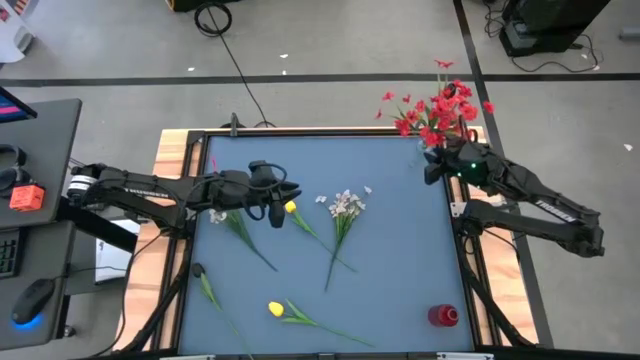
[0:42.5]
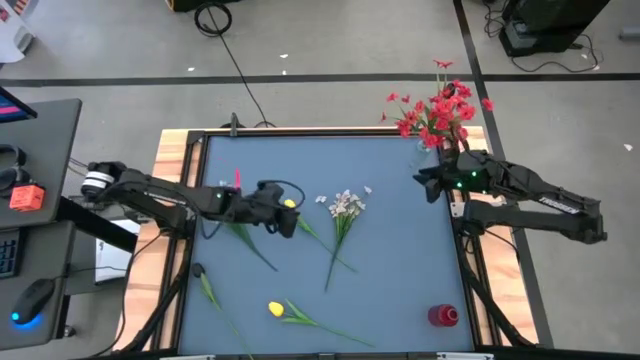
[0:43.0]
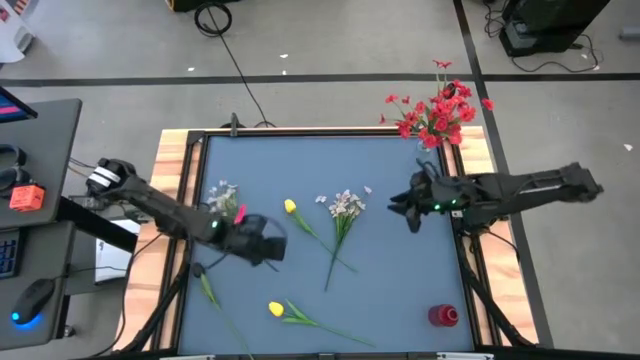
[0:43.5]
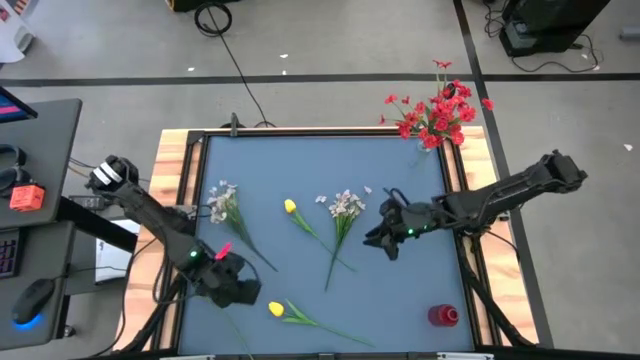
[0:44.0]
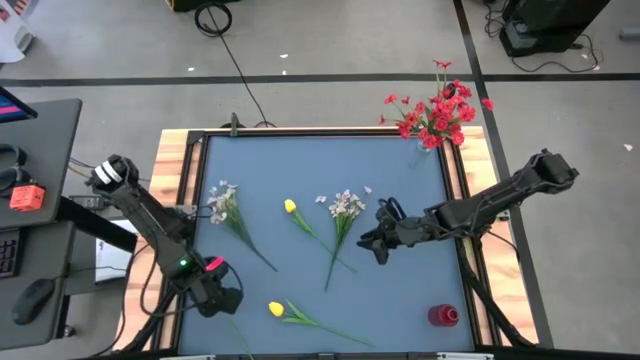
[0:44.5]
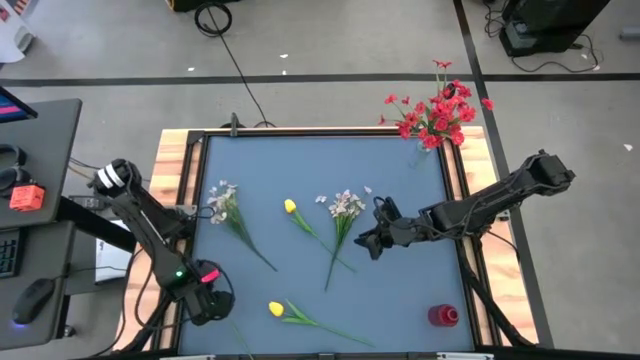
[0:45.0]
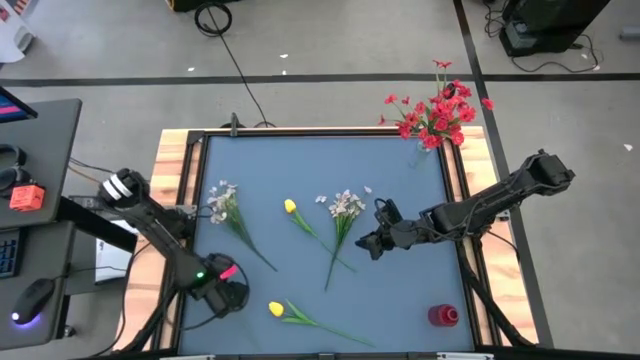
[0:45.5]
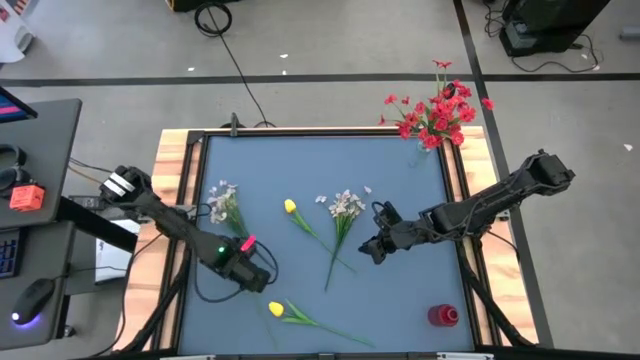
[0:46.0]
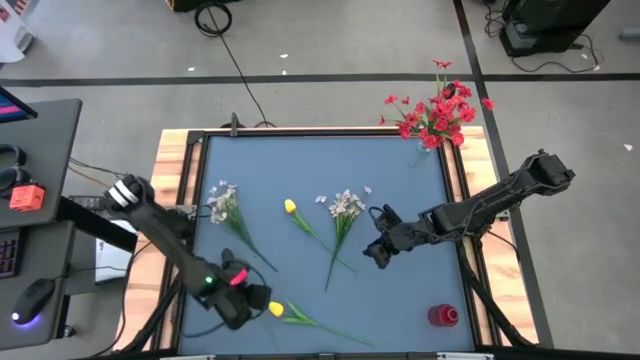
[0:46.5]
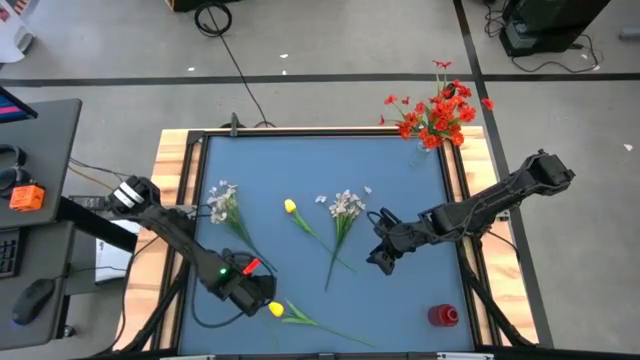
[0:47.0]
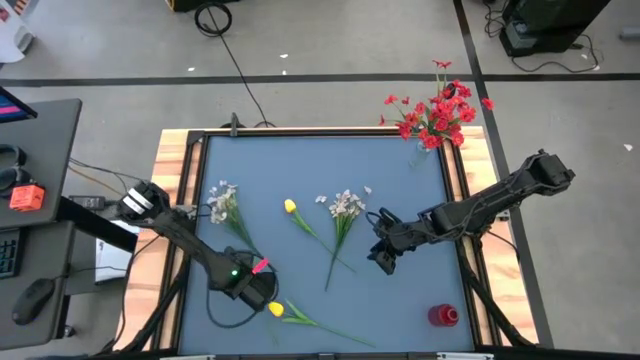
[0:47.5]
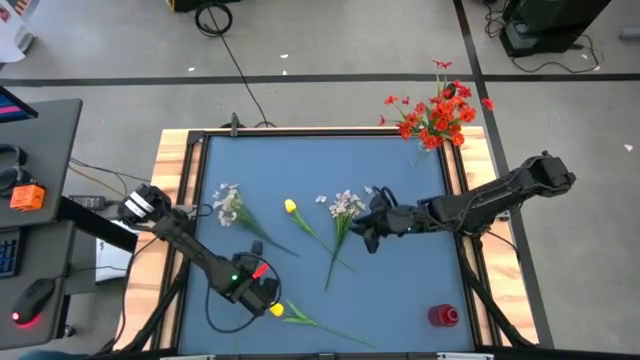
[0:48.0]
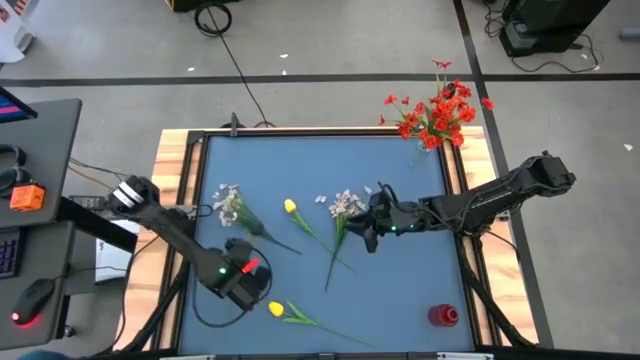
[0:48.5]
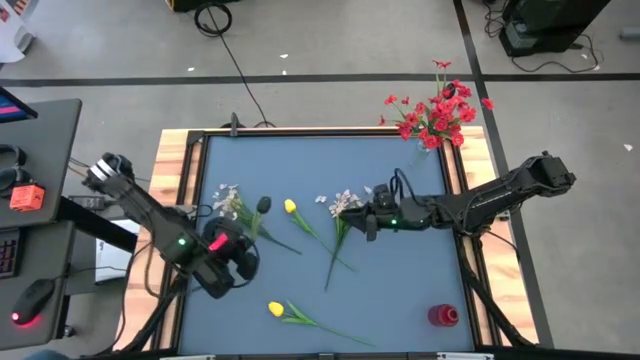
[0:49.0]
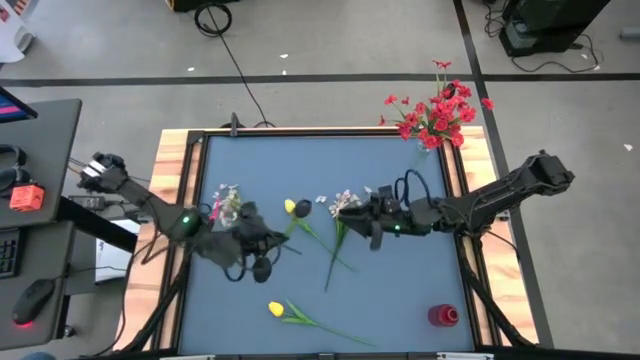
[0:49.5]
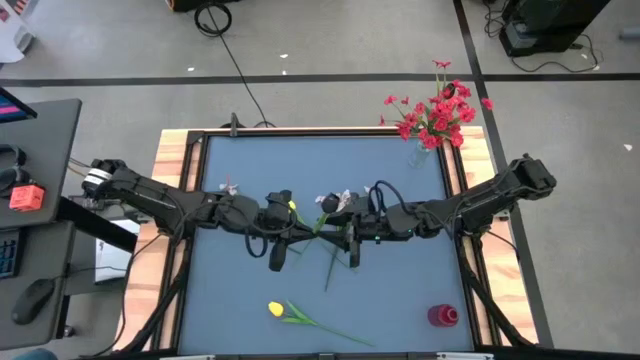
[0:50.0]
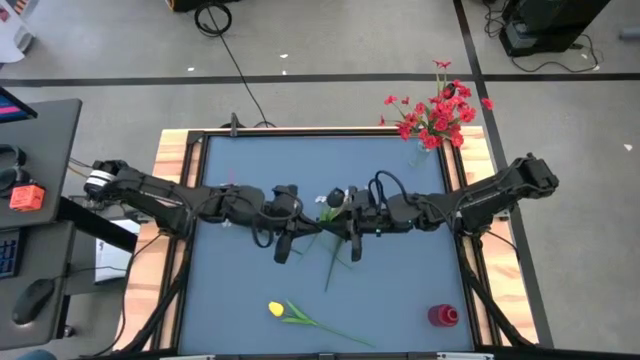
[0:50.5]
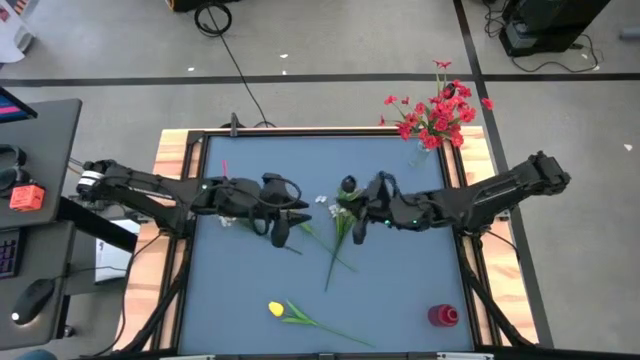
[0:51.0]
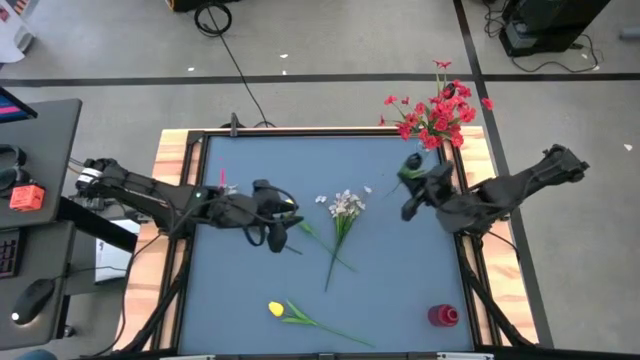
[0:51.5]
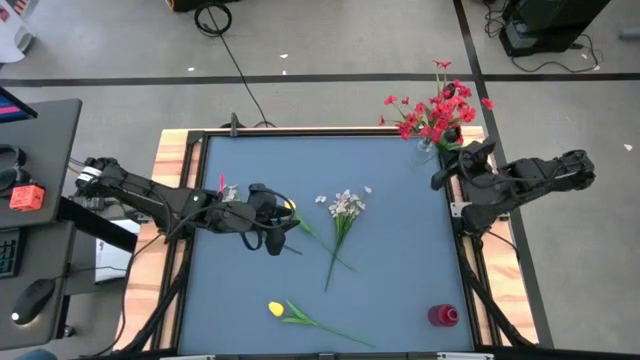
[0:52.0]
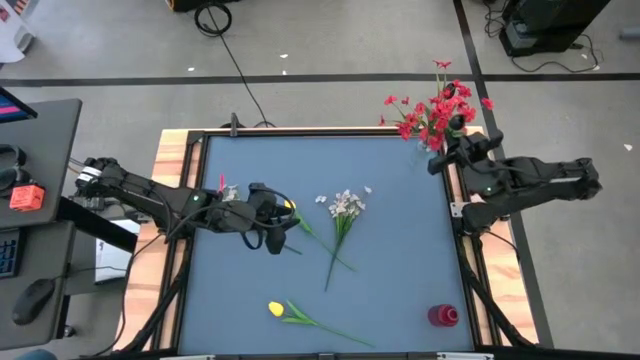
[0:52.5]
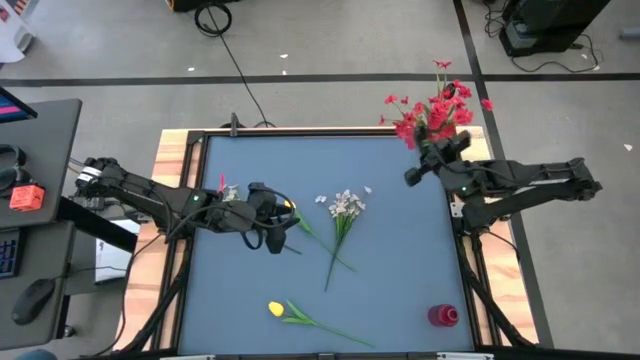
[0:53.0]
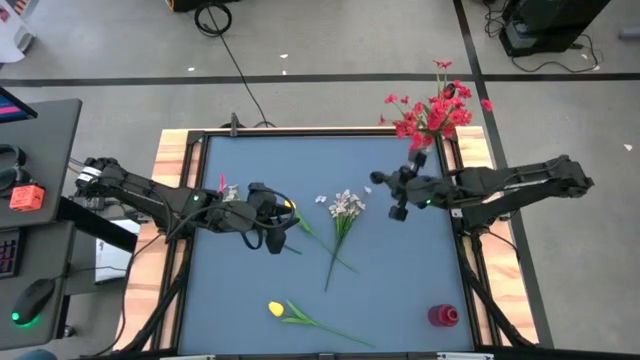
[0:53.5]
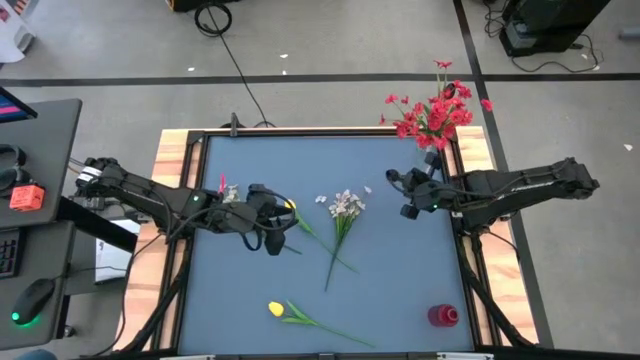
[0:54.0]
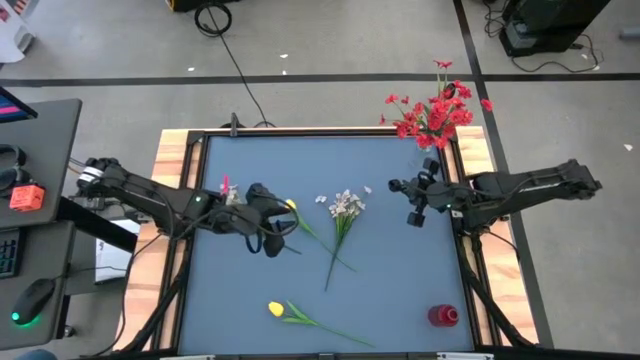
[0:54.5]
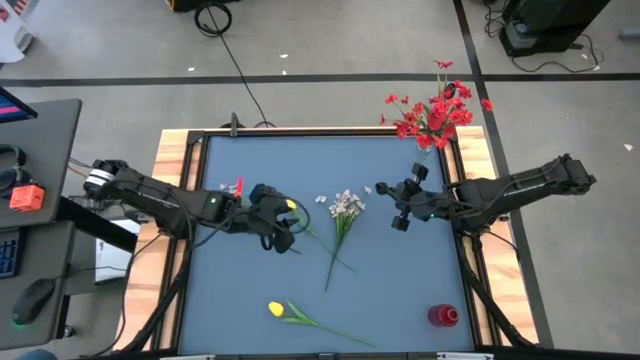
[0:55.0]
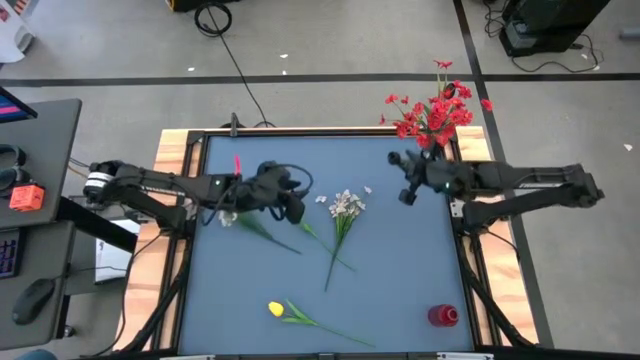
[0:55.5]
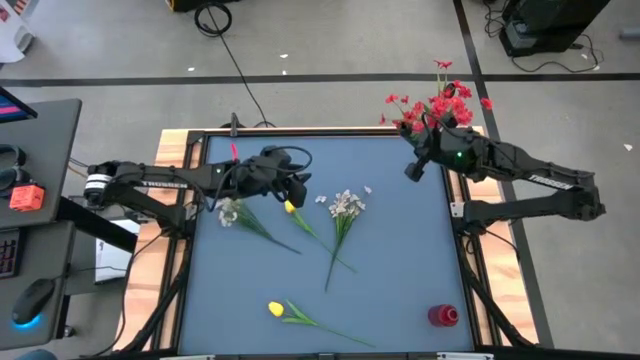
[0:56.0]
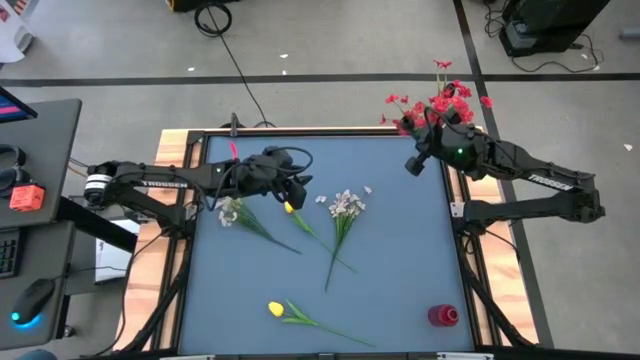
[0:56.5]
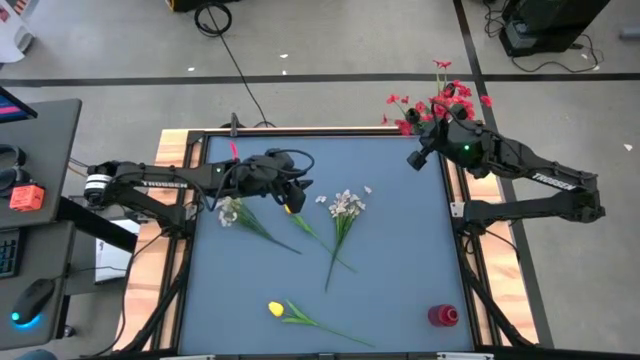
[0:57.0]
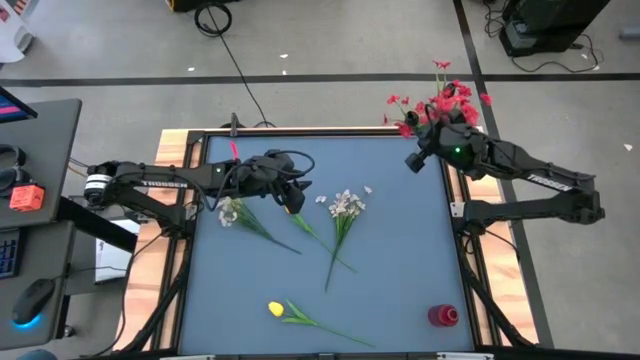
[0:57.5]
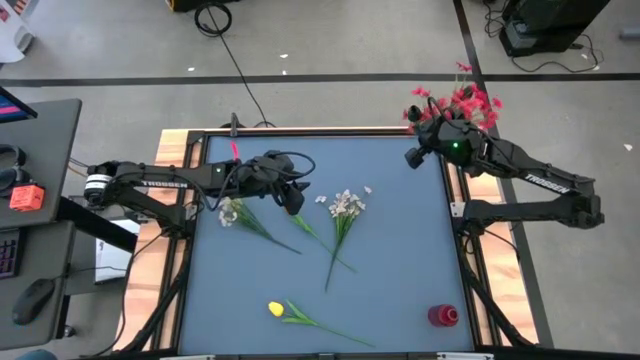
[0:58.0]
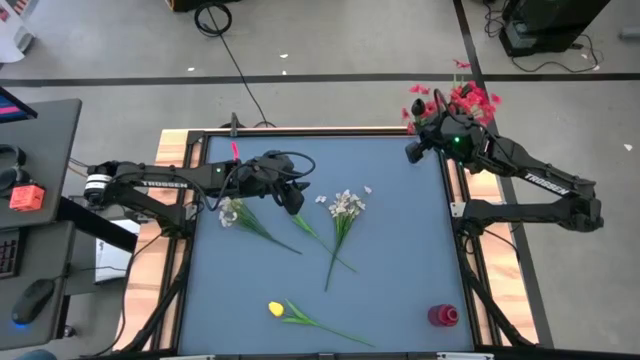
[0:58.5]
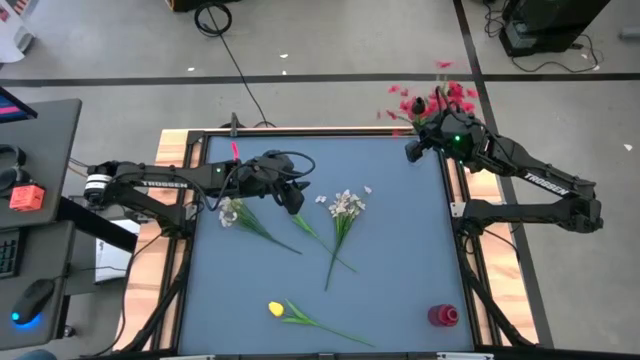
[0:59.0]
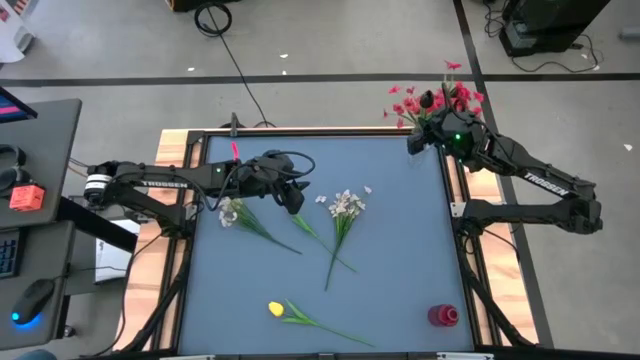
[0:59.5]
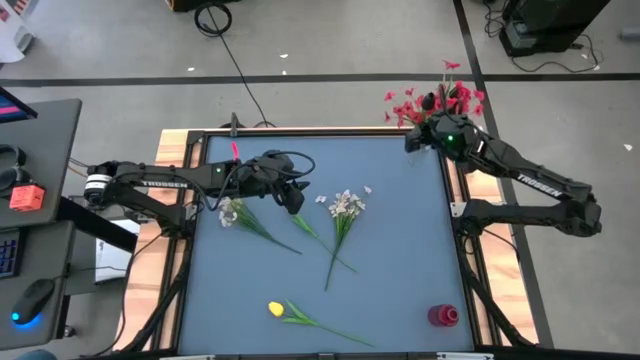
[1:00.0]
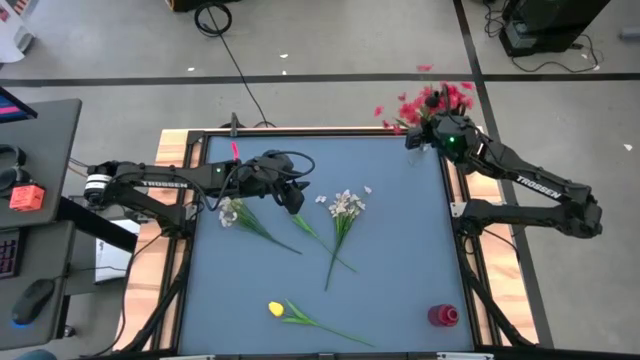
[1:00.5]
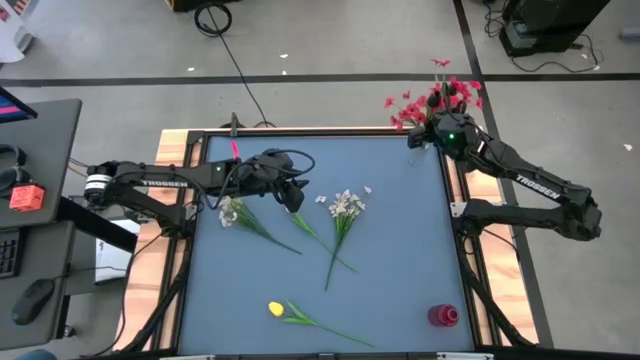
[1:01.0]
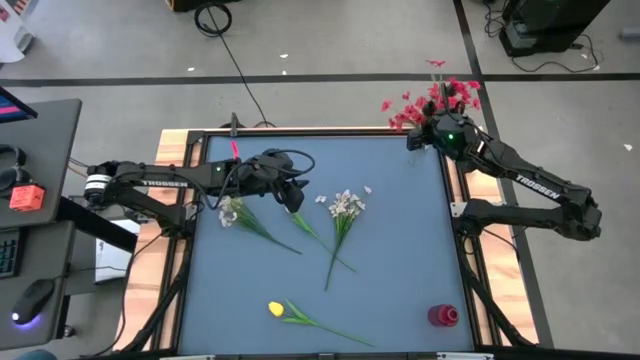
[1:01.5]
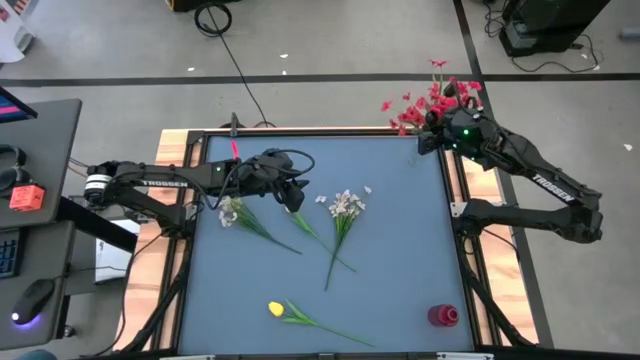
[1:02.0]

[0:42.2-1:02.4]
Task: Sort flowers into vase by color
Put the black flower into the transparent vase
